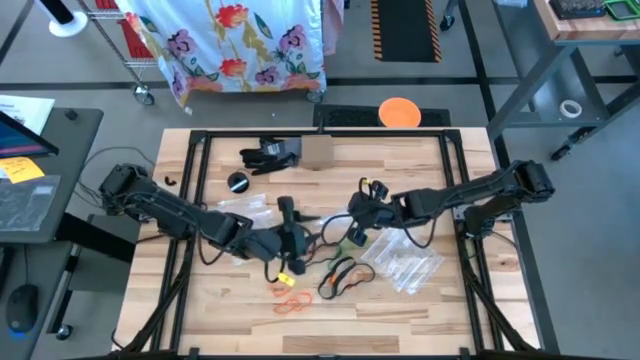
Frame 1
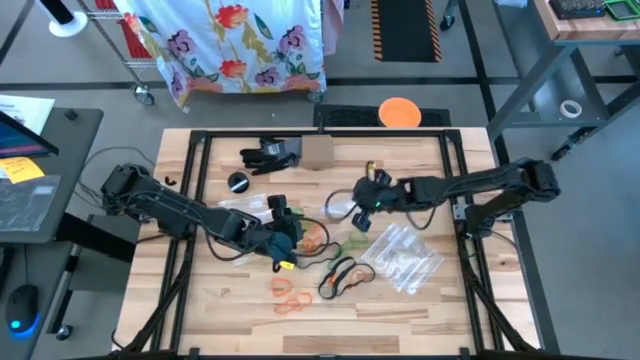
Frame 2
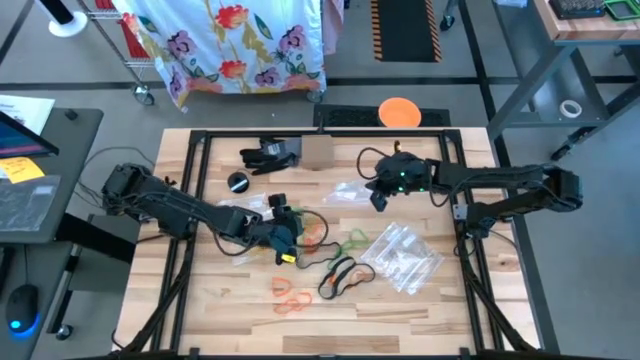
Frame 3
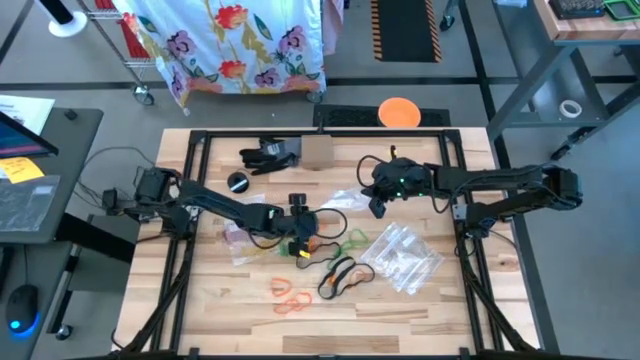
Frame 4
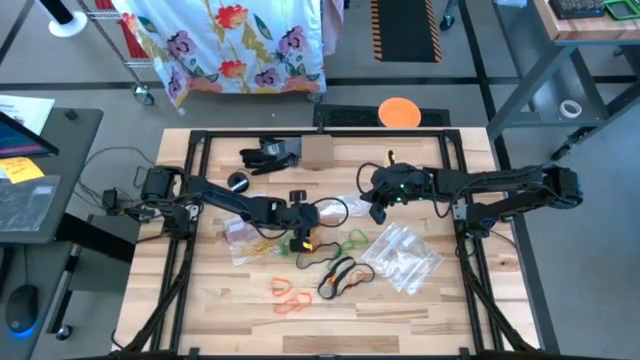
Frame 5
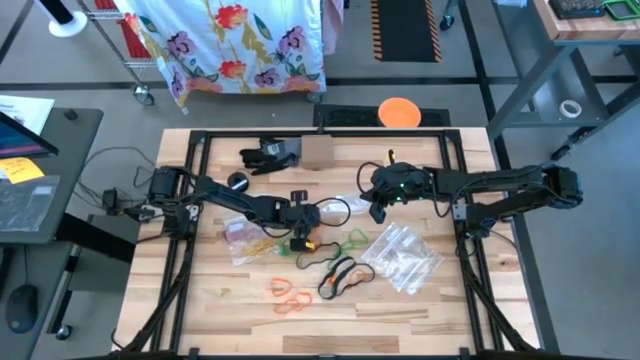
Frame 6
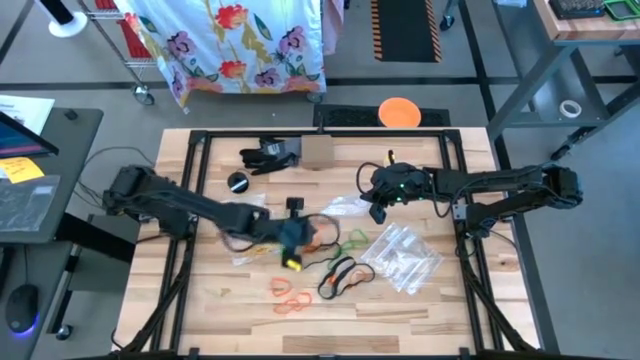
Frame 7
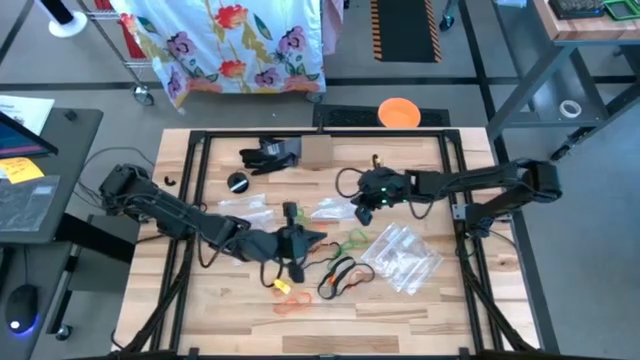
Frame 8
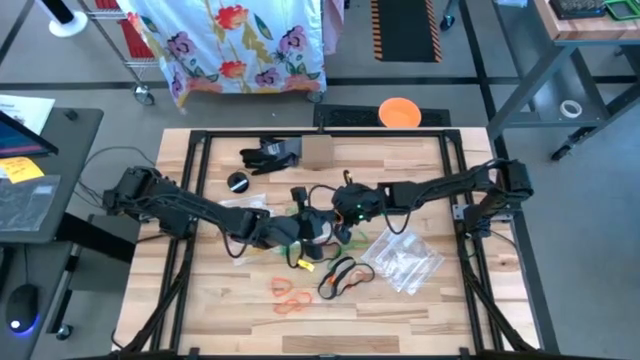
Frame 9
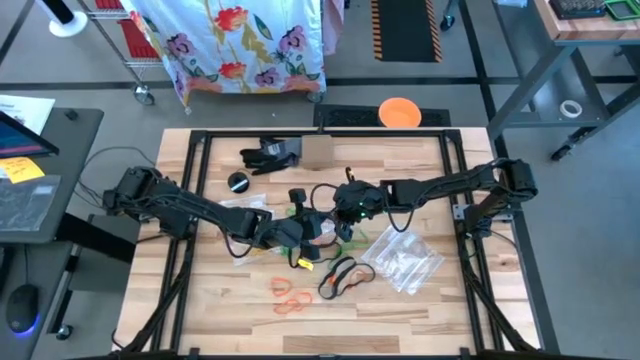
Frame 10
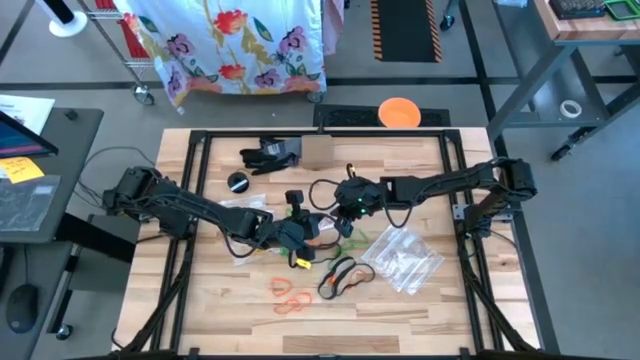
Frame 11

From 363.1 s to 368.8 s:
Task: Sort rubber bands
Put the orange rubber band into the transparent zip bag

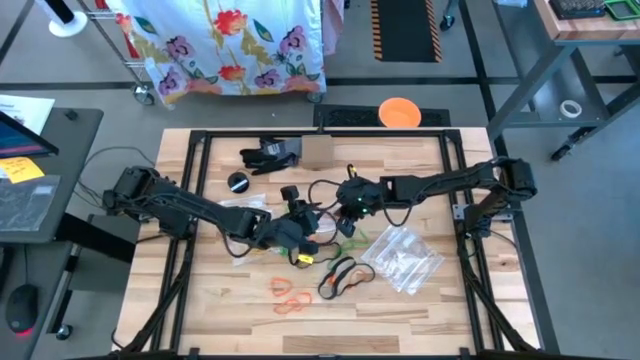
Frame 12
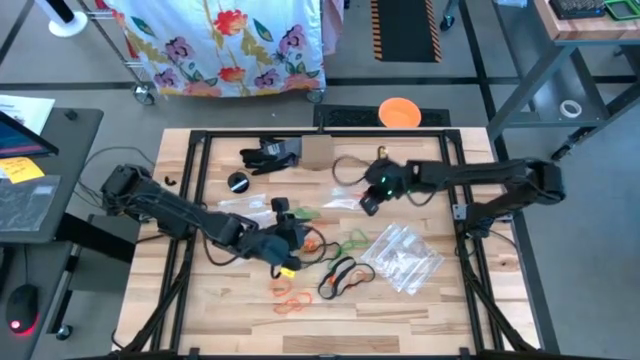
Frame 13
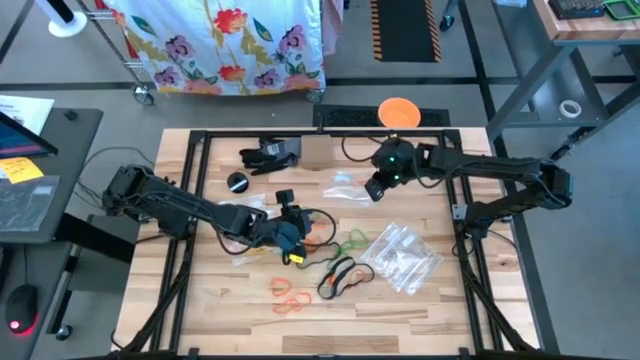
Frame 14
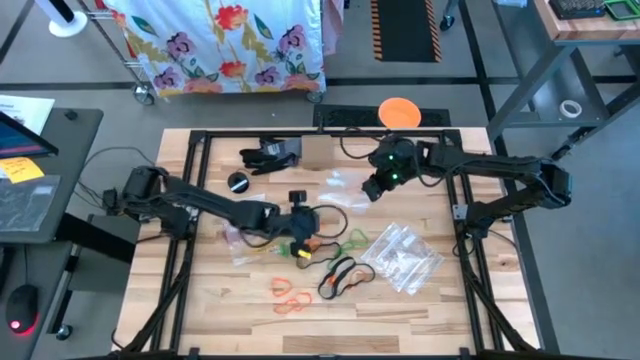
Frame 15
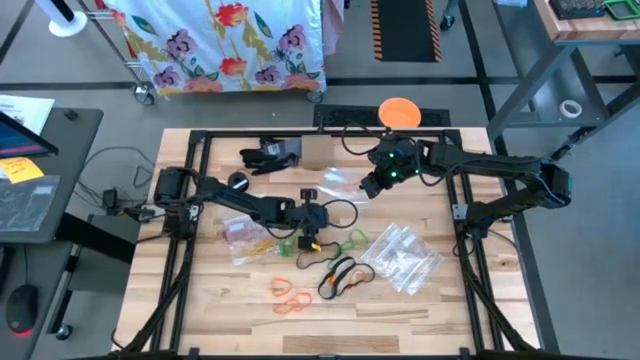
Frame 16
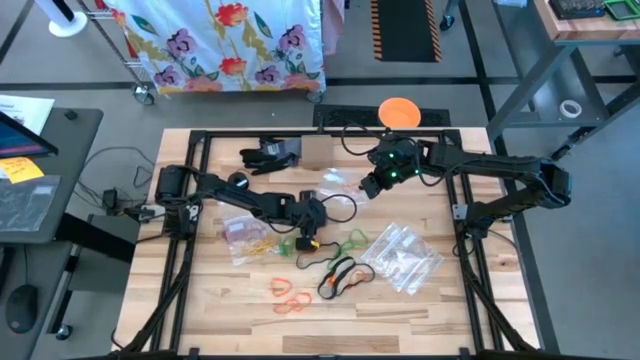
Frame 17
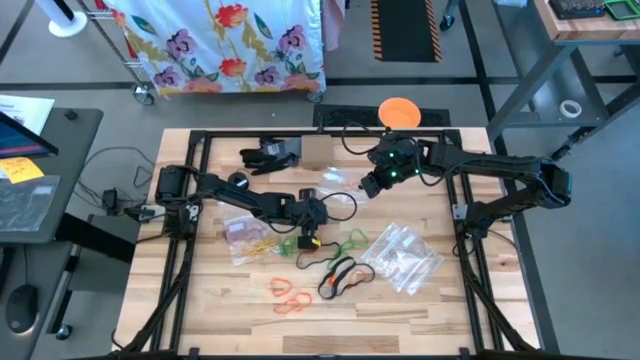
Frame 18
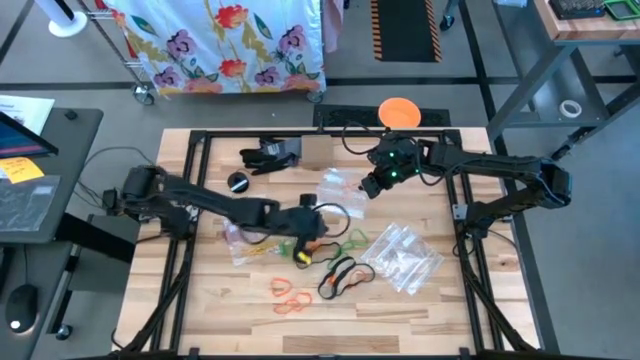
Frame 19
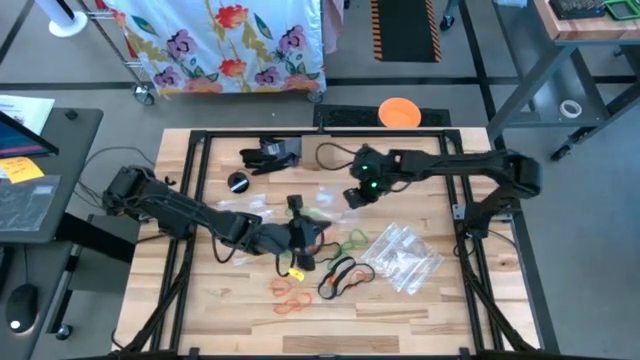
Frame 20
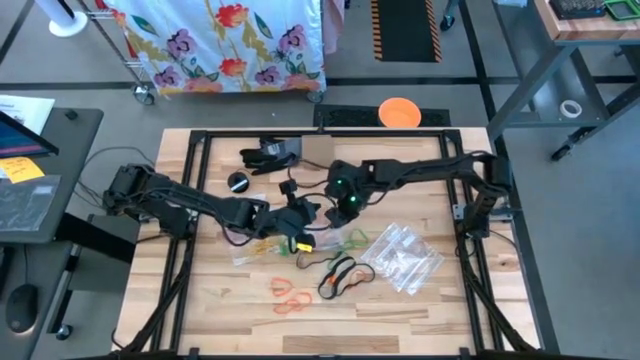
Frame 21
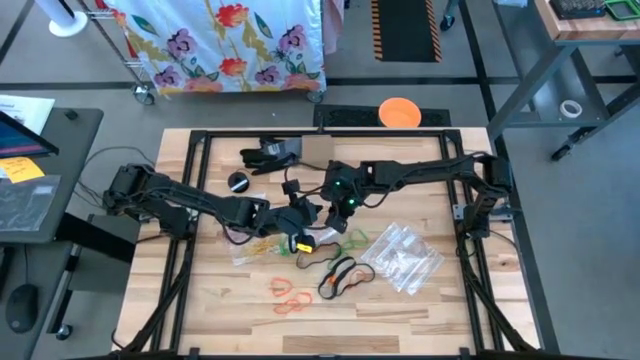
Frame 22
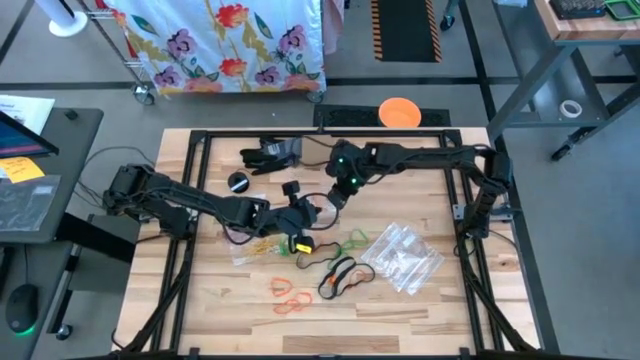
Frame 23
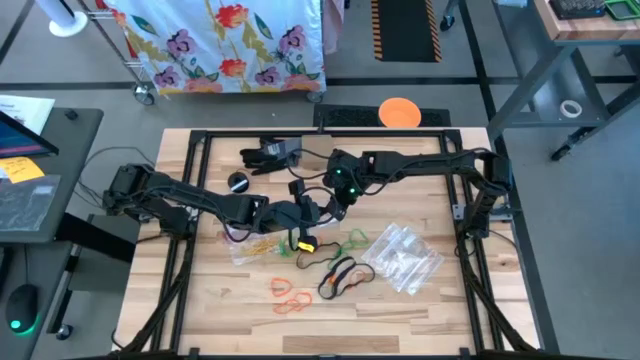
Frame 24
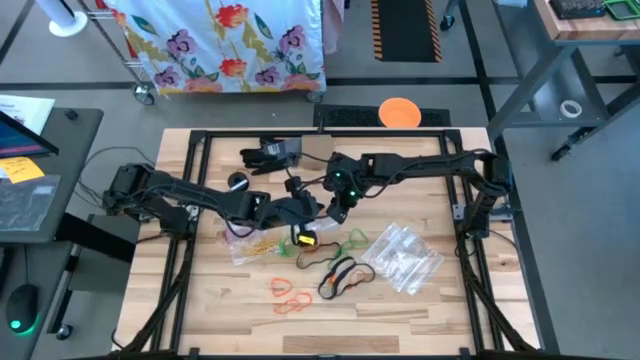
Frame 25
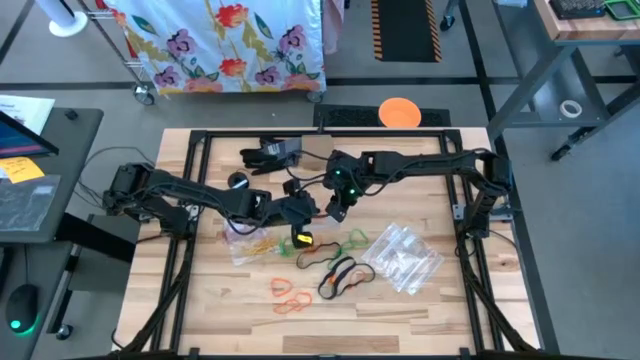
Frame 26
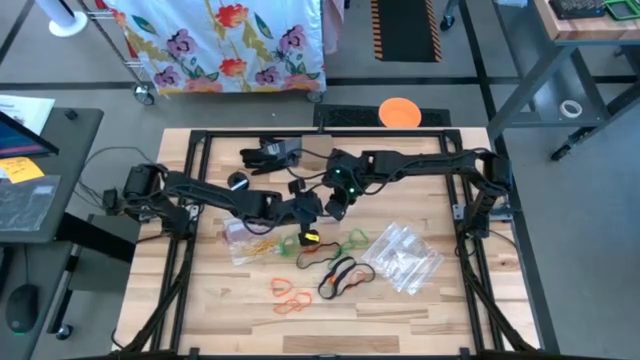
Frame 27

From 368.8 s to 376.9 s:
Put the orange rubber band into the transparent zip bag

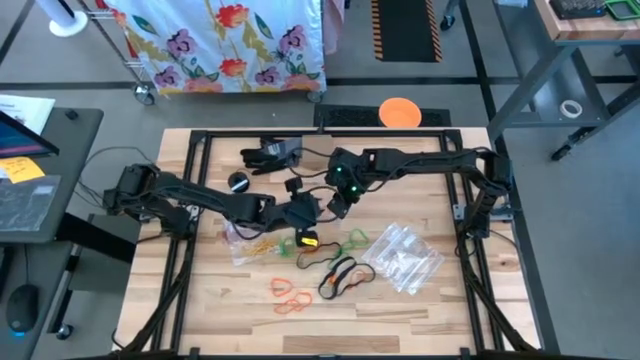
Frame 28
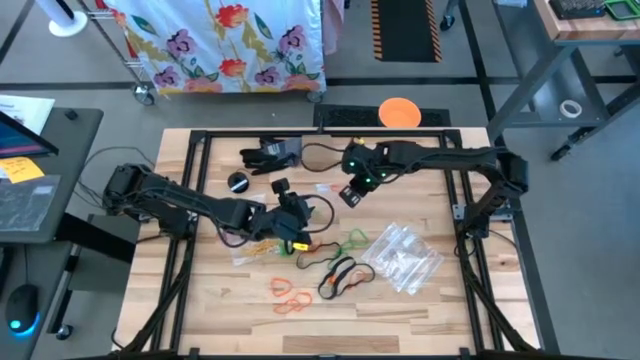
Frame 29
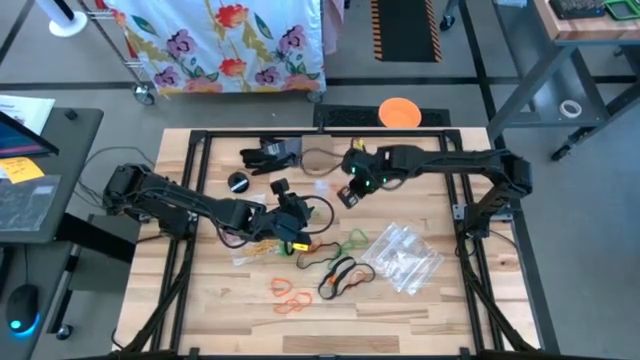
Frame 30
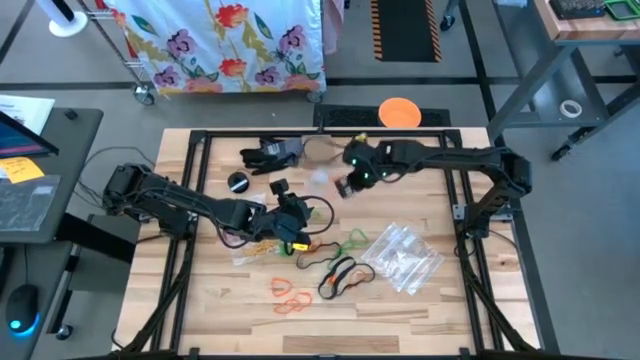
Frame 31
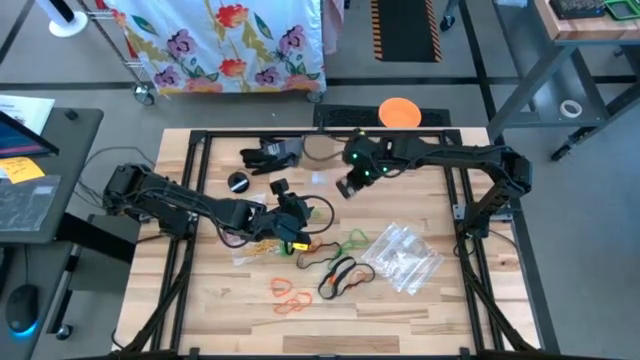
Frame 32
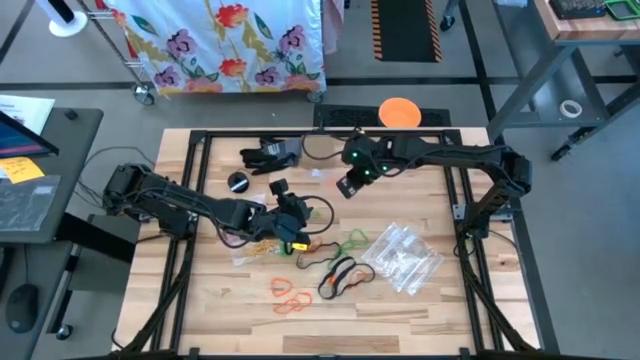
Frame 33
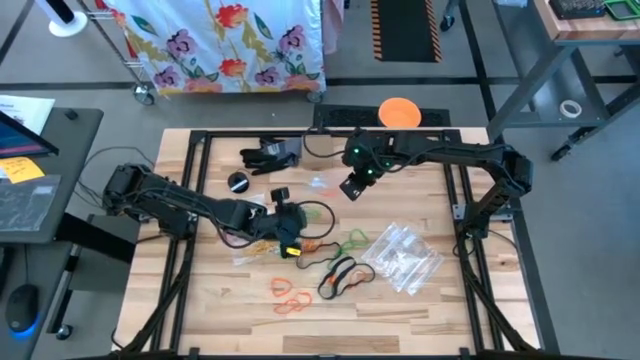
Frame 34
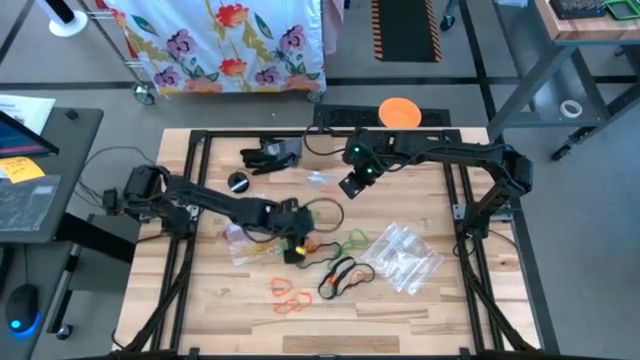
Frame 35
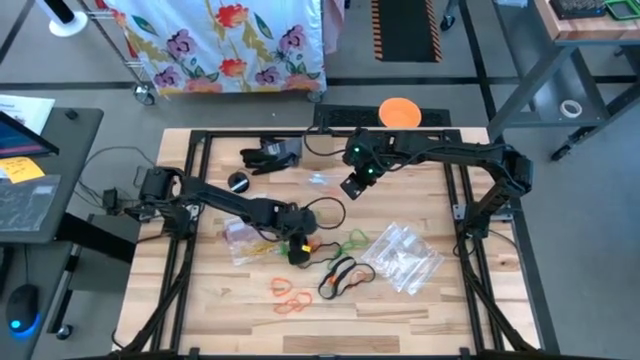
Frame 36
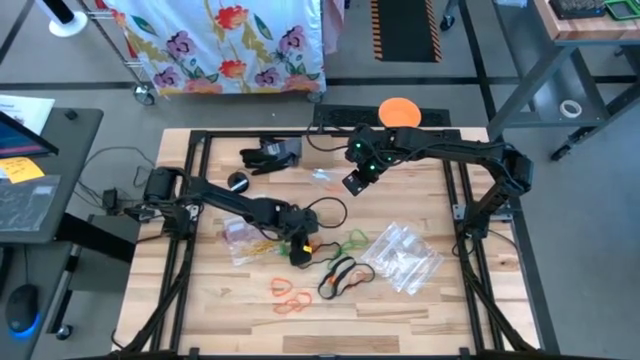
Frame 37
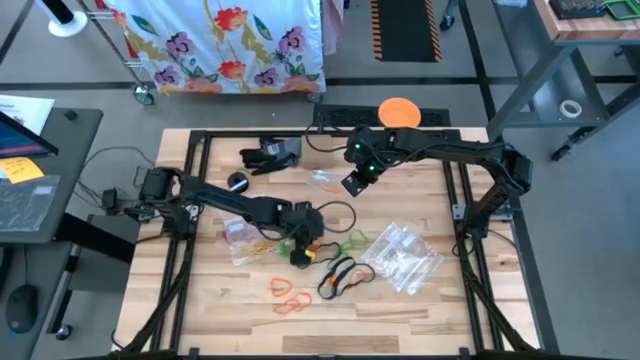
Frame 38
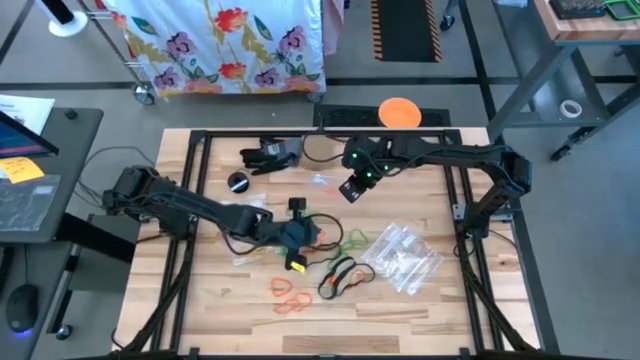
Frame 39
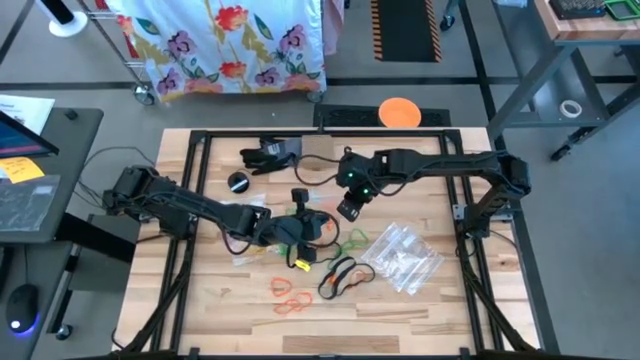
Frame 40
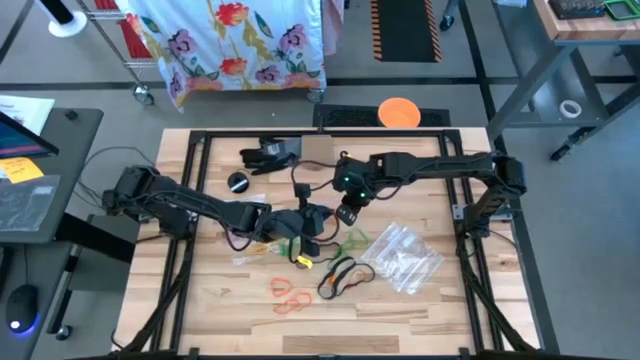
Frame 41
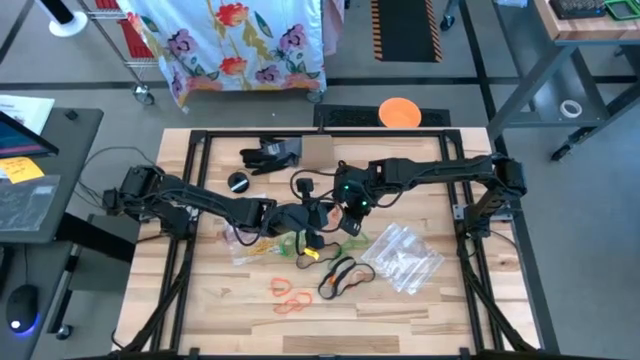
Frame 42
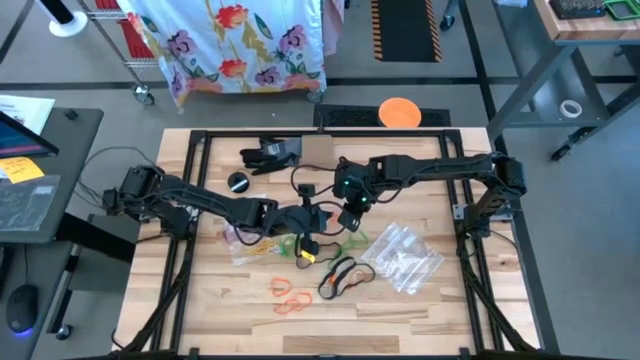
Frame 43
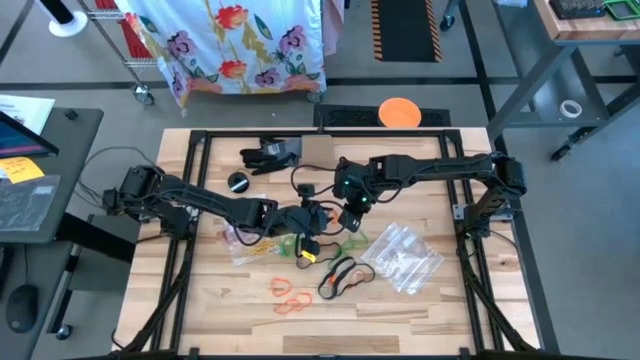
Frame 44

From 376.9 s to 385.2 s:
Put the orange rubber band into the transparent zip bag
